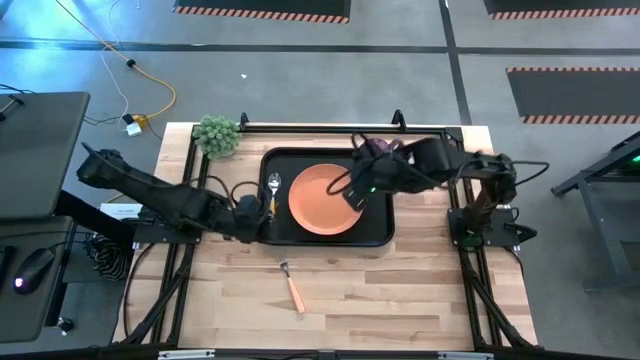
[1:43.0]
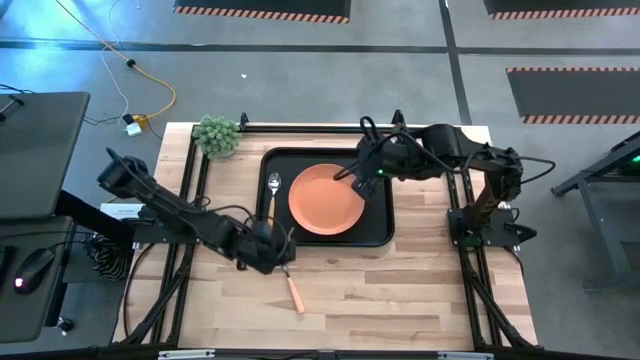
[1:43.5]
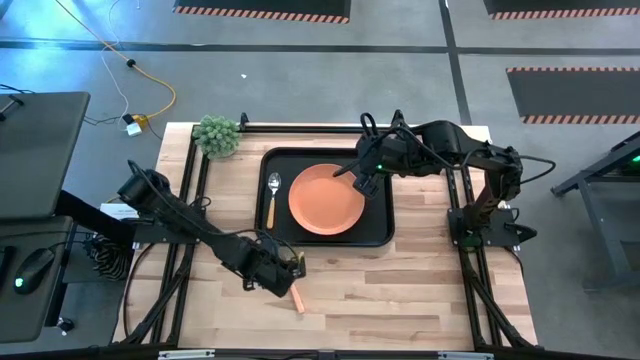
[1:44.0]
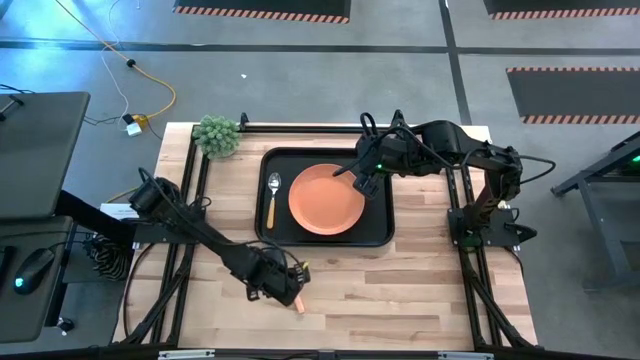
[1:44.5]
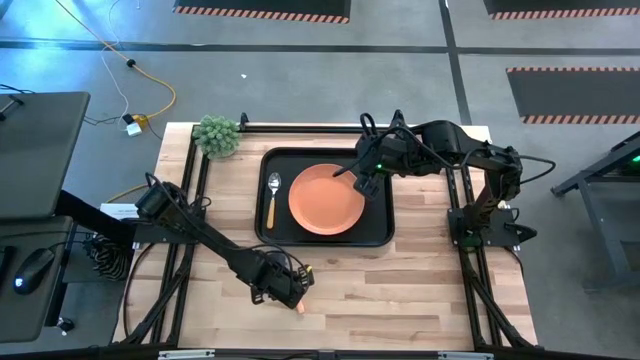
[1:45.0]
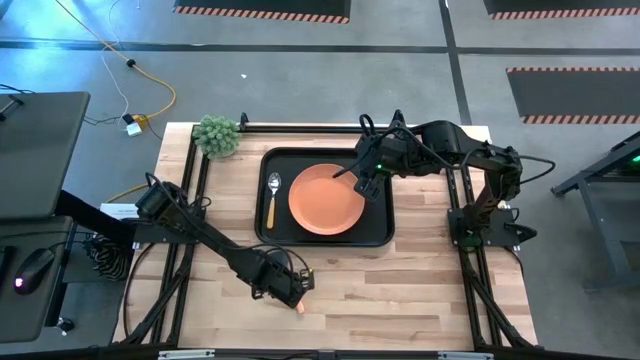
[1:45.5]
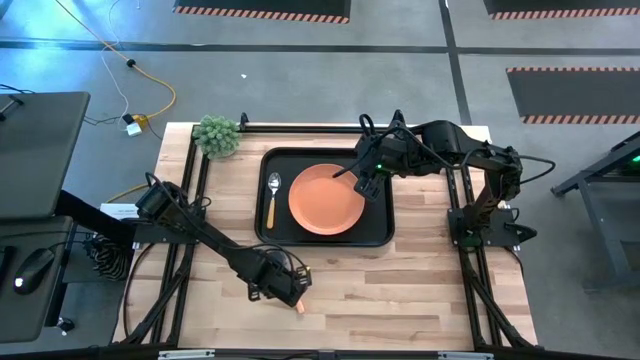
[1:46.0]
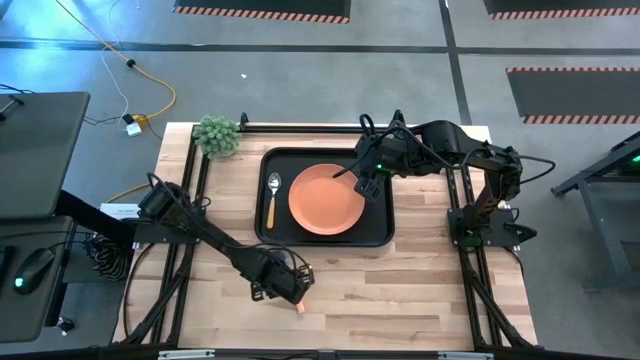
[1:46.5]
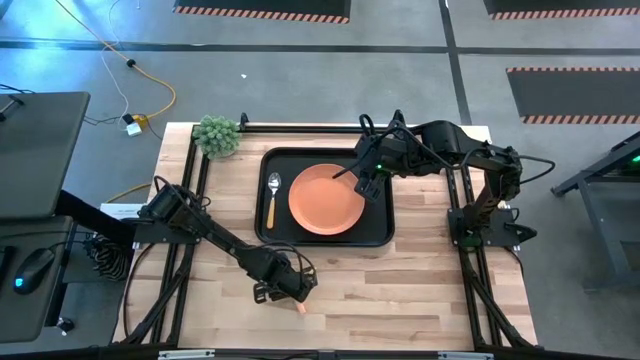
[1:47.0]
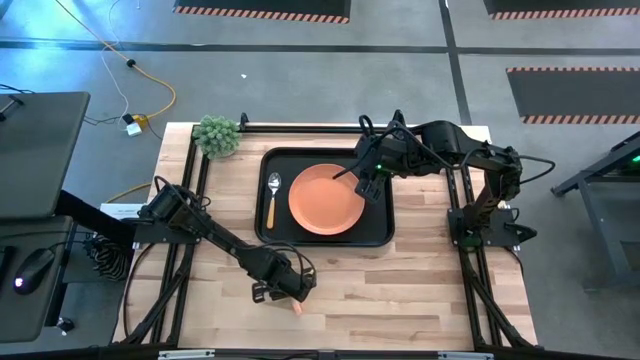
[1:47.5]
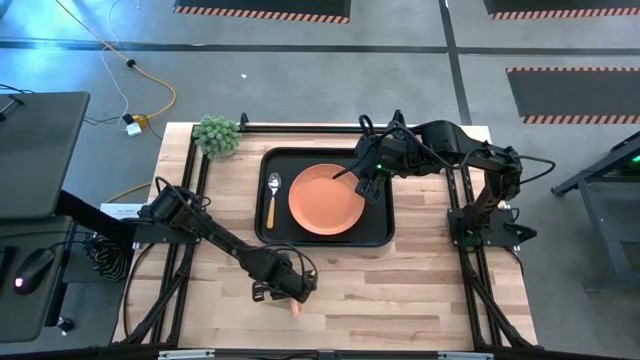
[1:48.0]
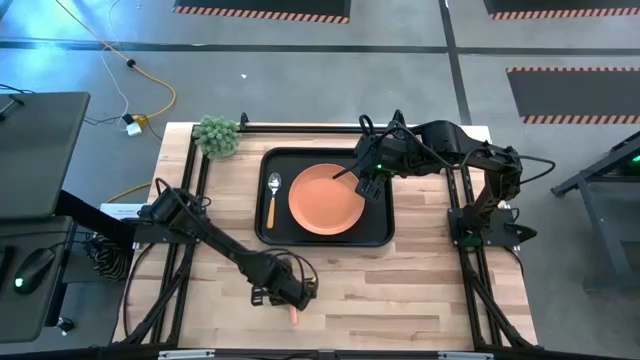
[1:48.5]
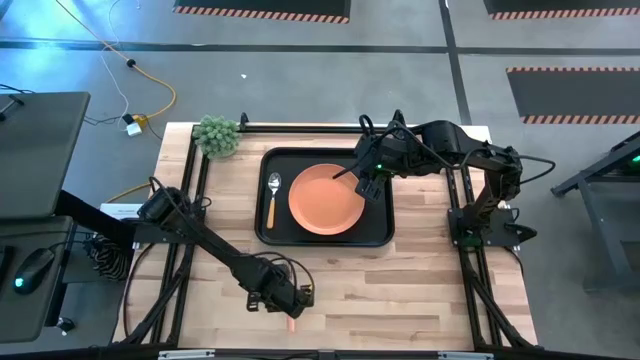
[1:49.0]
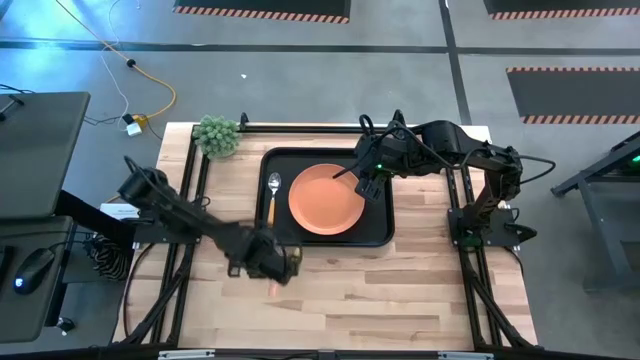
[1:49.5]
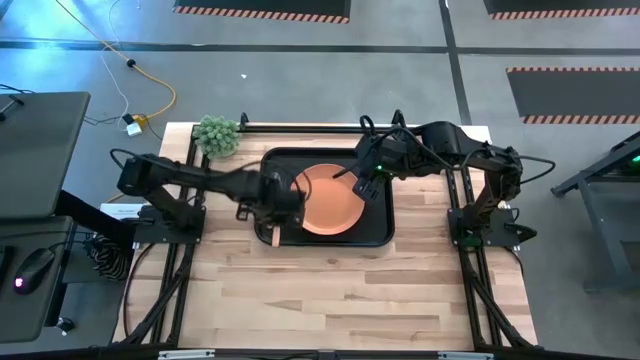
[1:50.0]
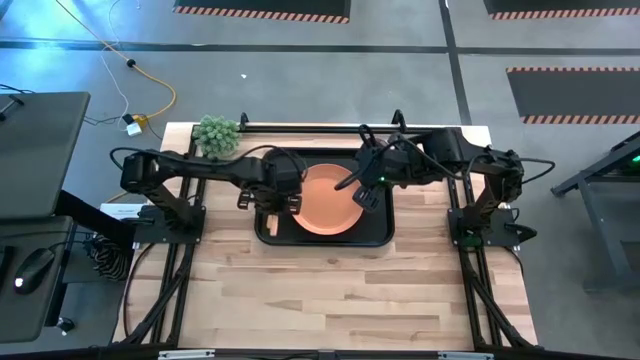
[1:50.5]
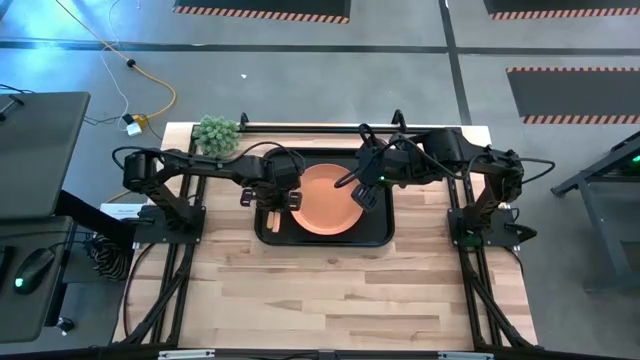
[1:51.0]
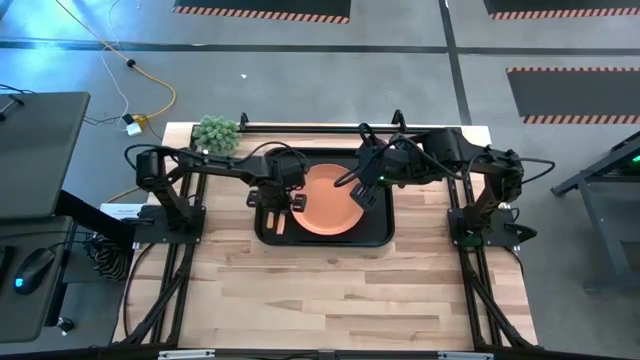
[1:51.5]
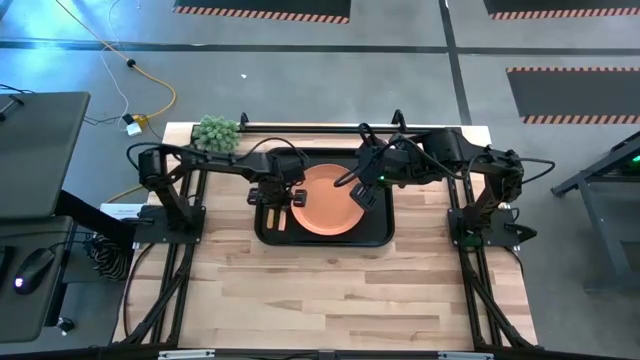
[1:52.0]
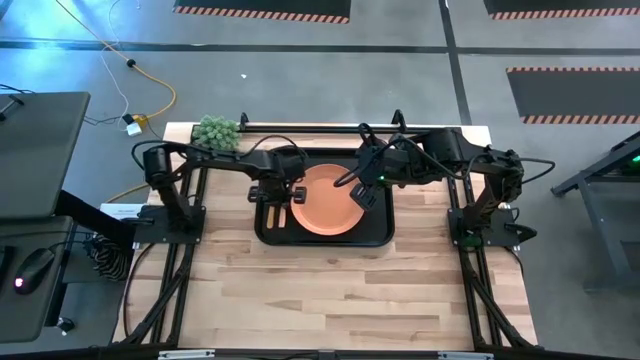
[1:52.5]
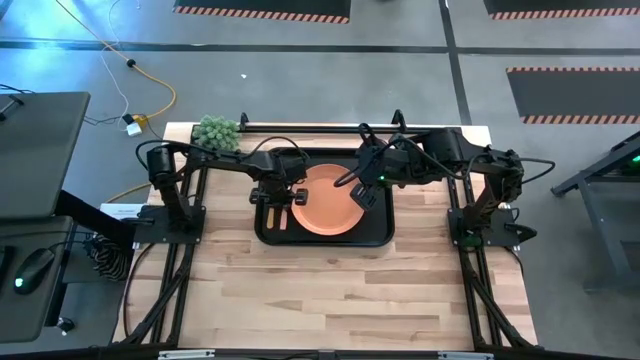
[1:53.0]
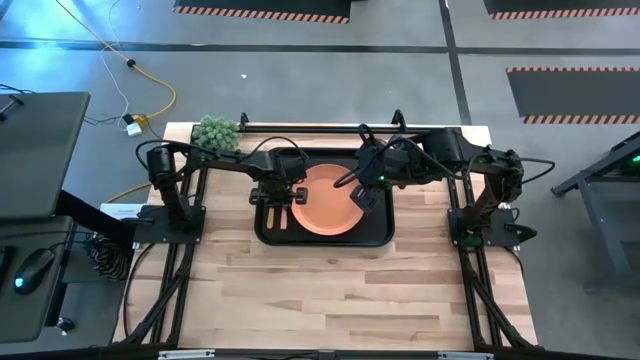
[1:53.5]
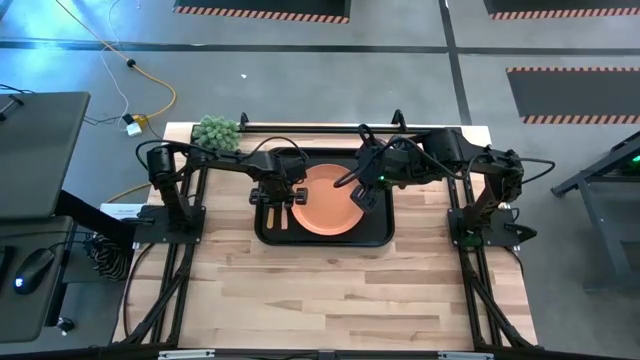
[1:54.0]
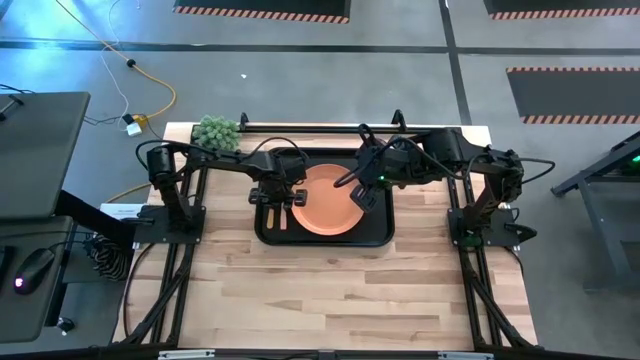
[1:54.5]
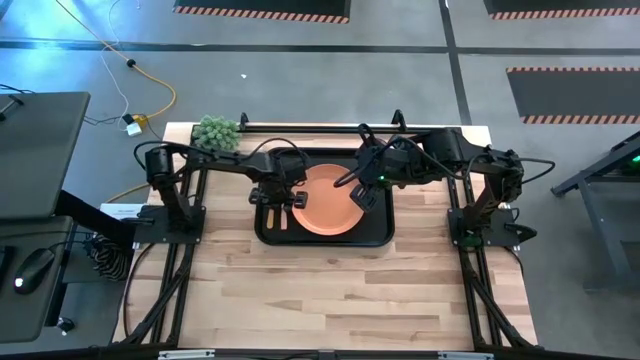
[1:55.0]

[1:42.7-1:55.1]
Task: Pick and place plate/cup/fork/spoon on tray
Put the orange fork between the orange spoon and the orange plate on the black serving tray

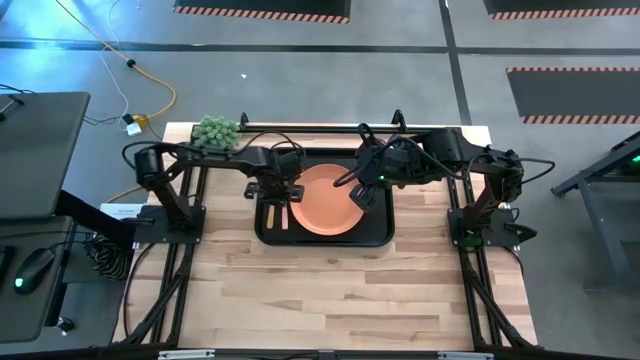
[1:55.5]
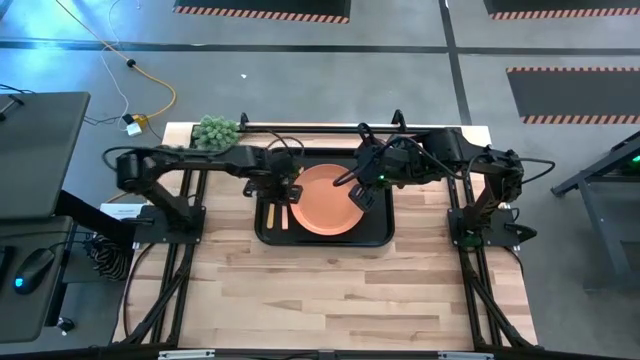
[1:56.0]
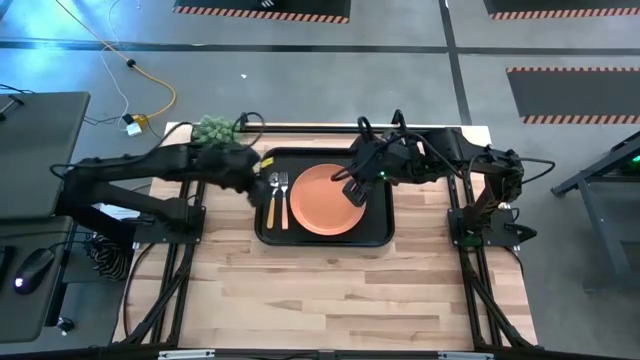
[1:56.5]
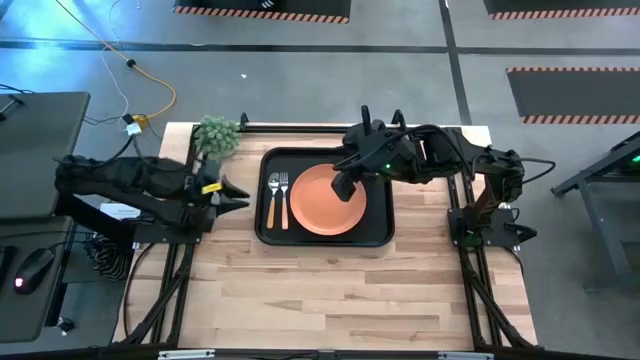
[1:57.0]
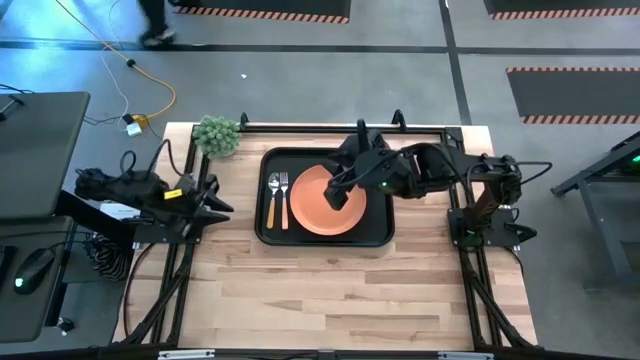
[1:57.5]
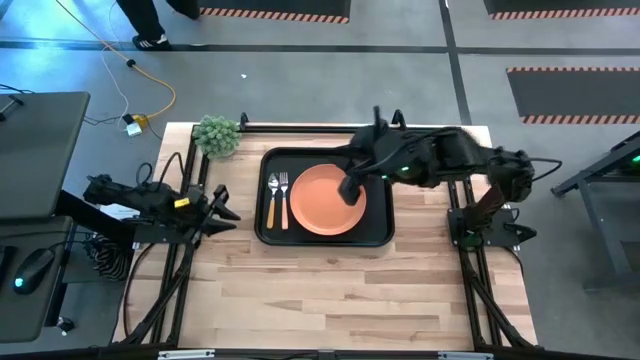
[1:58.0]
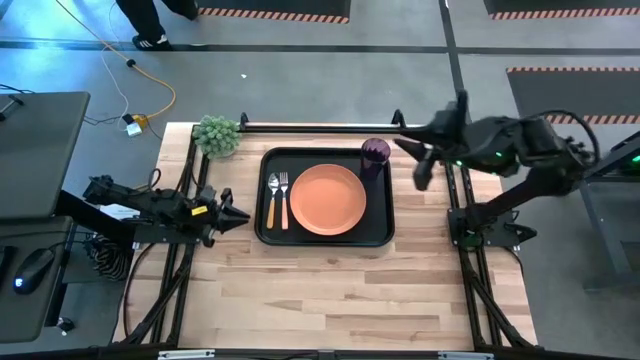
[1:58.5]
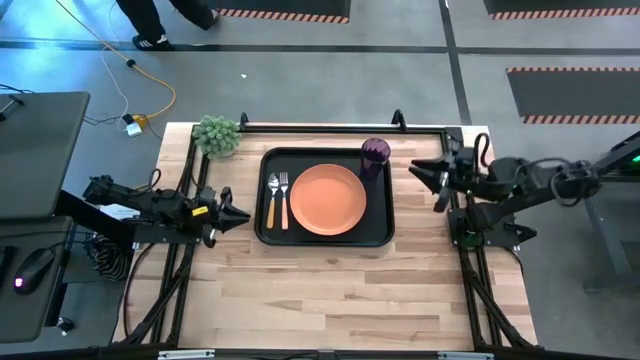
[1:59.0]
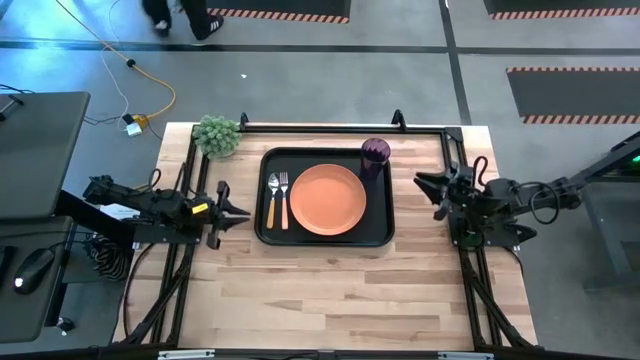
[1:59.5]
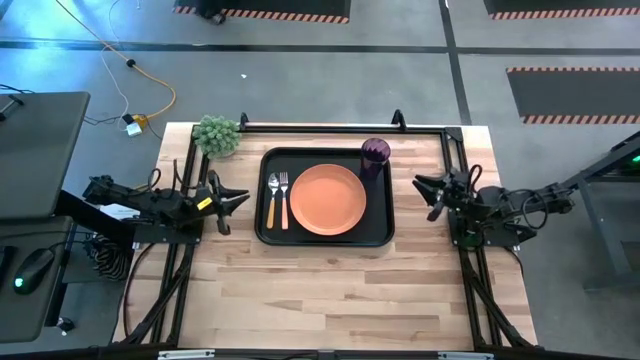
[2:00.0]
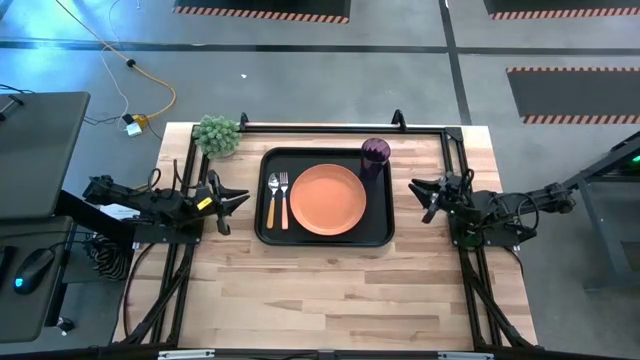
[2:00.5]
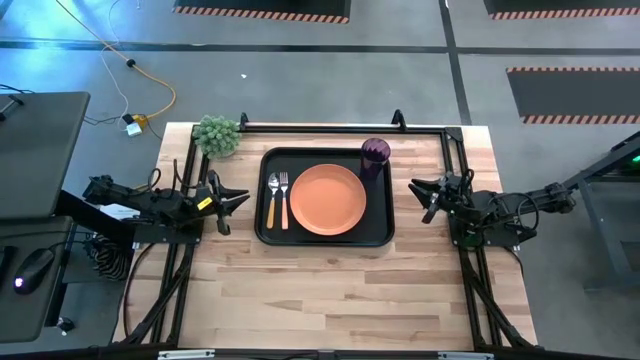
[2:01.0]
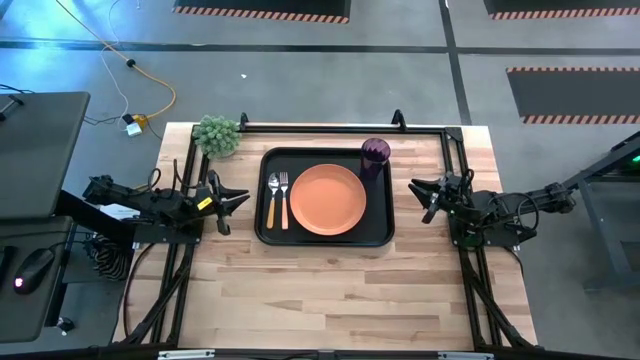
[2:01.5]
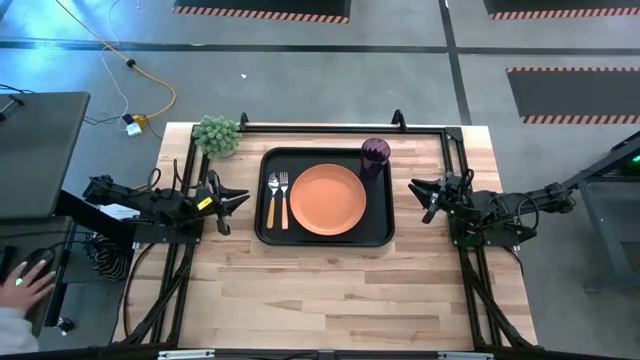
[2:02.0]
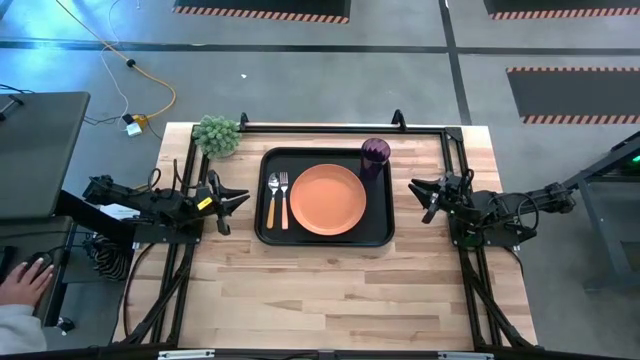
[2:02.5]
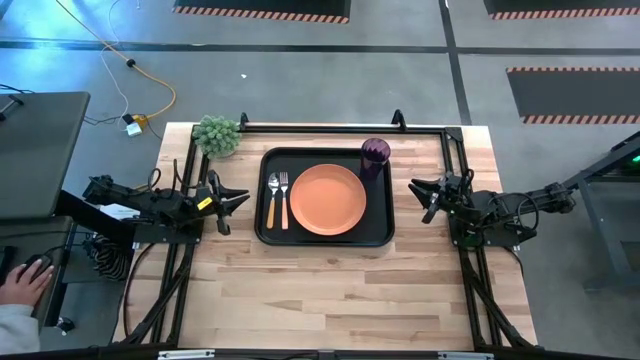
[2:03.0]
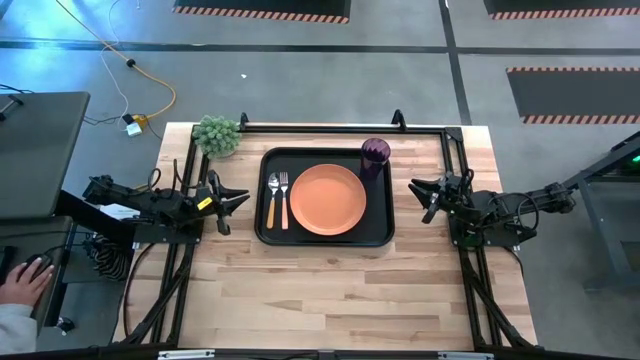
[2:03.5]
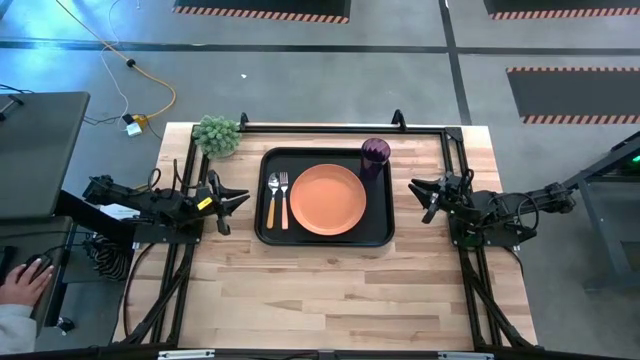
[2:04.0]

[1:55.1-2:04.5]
Return to Home Position
